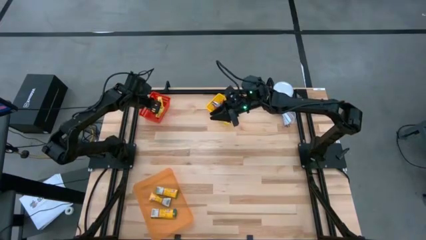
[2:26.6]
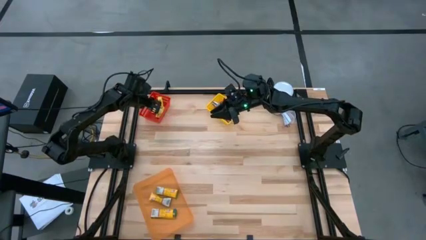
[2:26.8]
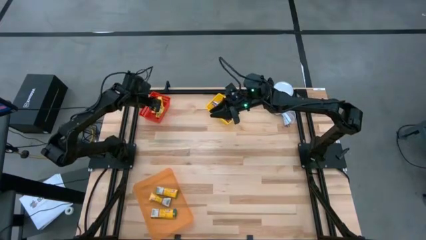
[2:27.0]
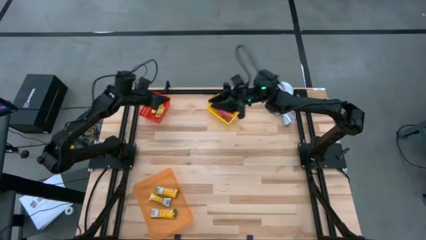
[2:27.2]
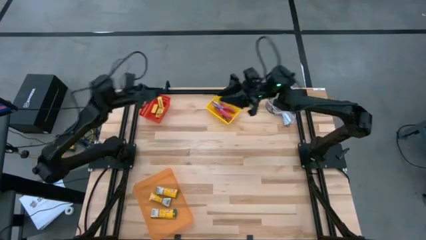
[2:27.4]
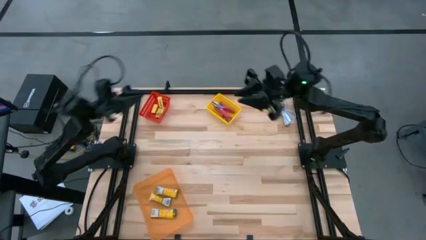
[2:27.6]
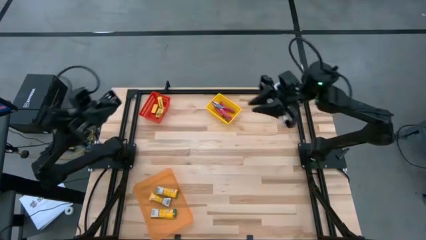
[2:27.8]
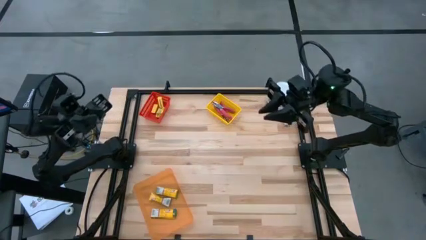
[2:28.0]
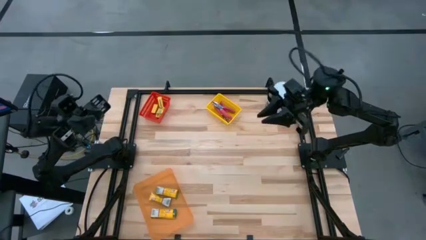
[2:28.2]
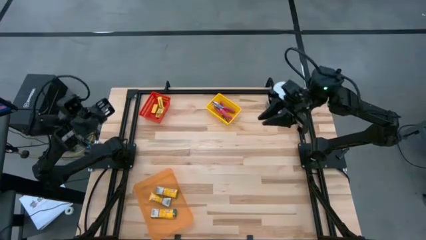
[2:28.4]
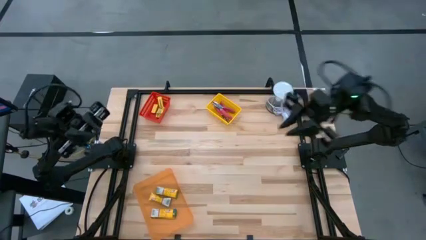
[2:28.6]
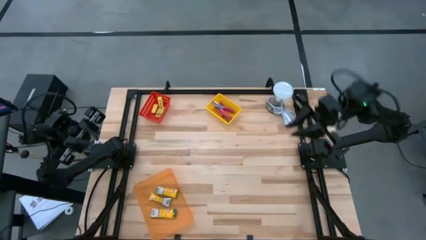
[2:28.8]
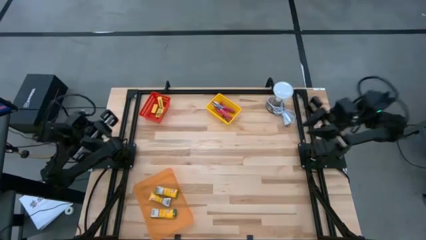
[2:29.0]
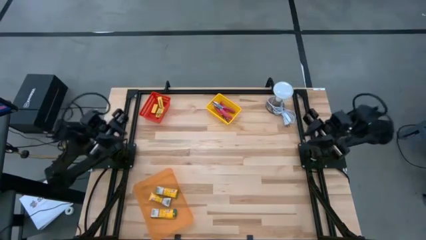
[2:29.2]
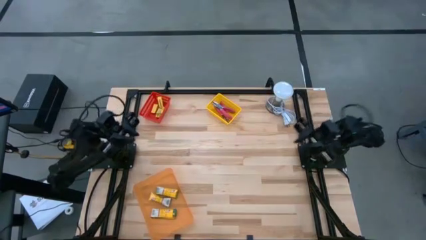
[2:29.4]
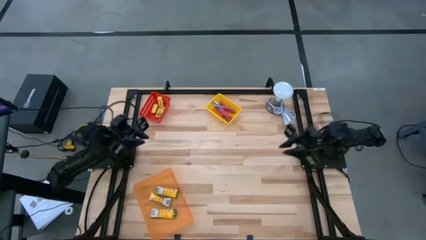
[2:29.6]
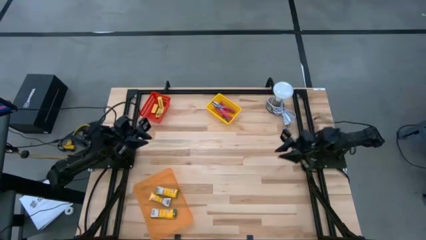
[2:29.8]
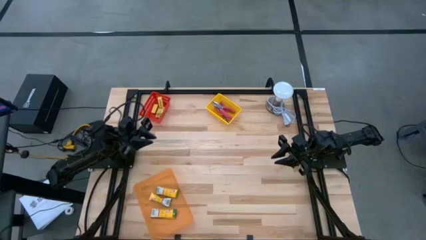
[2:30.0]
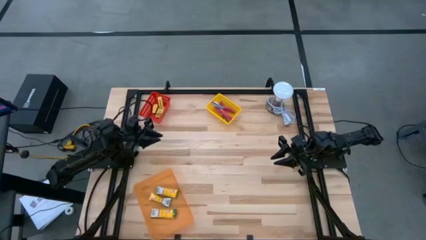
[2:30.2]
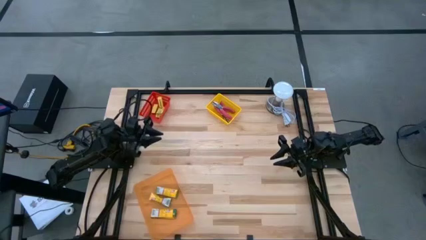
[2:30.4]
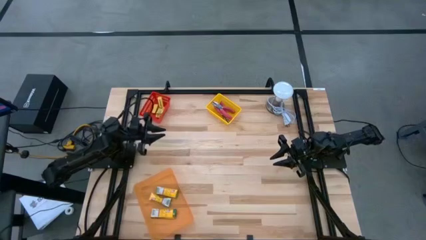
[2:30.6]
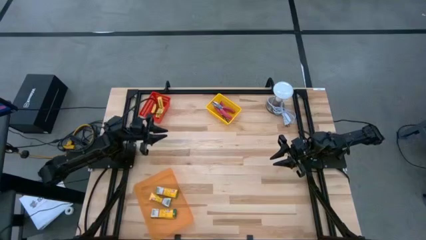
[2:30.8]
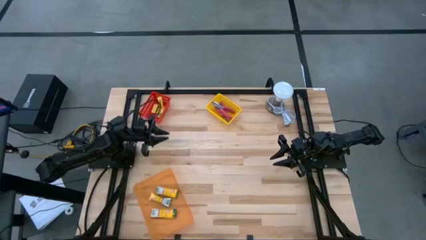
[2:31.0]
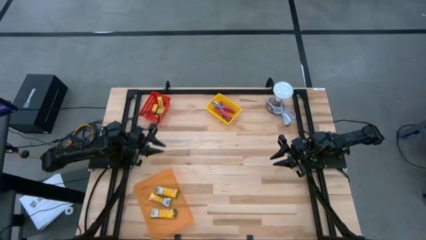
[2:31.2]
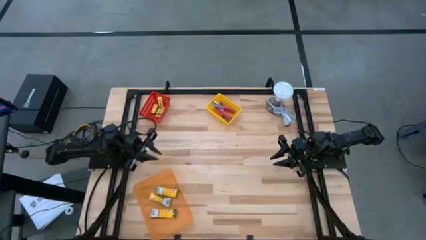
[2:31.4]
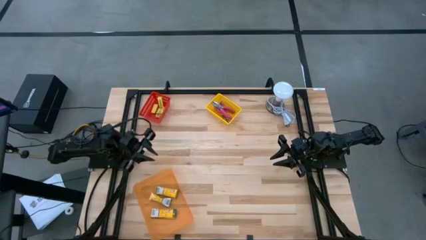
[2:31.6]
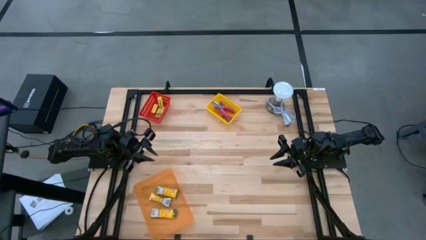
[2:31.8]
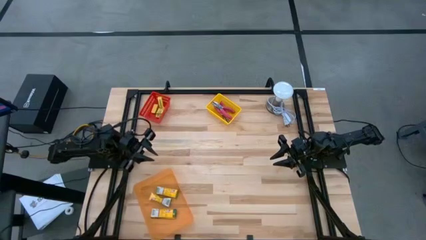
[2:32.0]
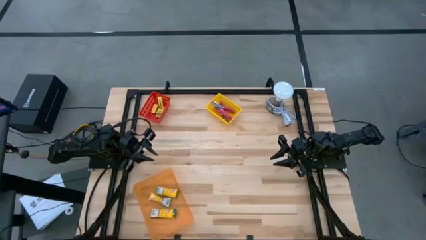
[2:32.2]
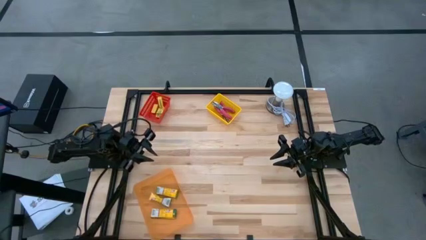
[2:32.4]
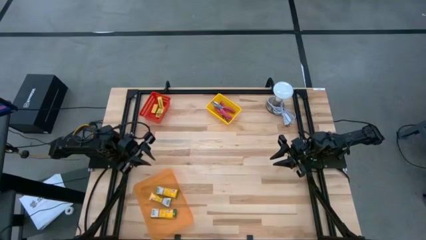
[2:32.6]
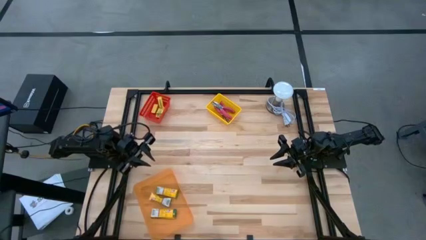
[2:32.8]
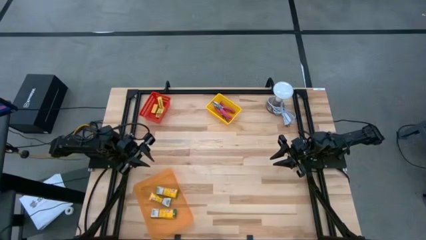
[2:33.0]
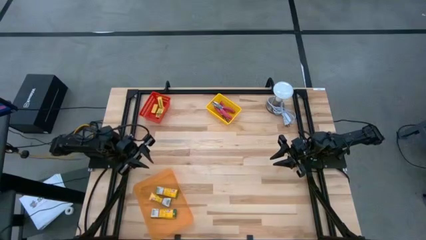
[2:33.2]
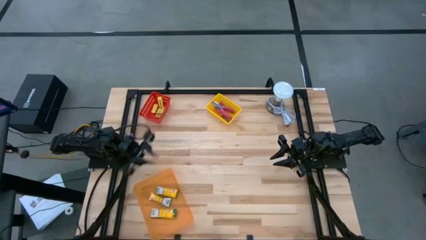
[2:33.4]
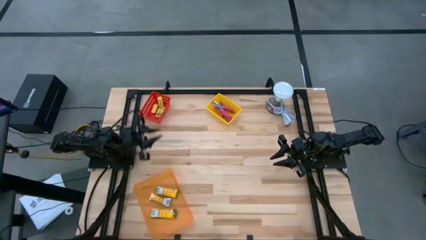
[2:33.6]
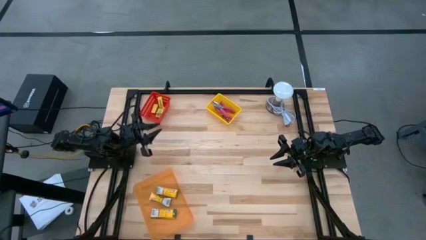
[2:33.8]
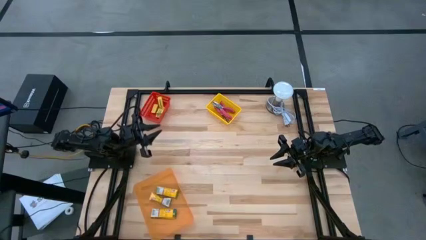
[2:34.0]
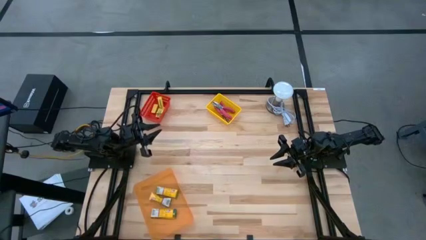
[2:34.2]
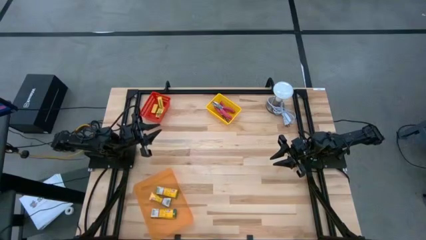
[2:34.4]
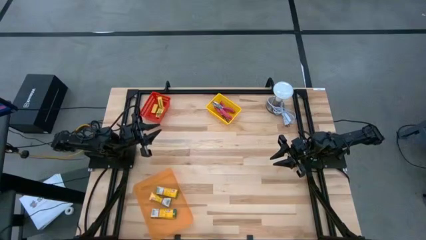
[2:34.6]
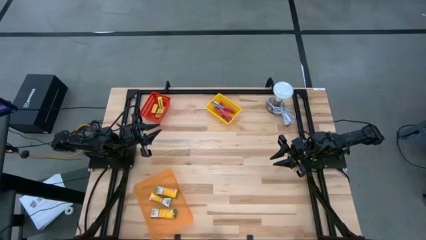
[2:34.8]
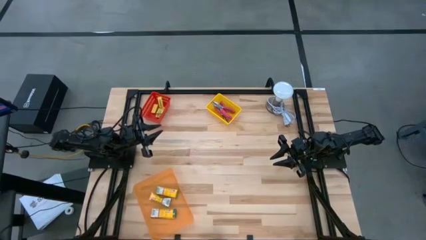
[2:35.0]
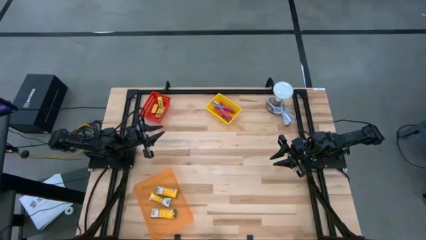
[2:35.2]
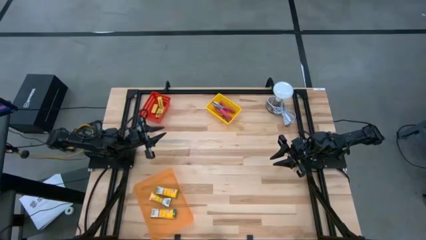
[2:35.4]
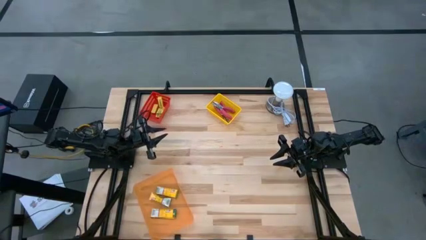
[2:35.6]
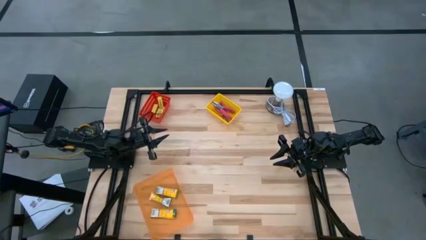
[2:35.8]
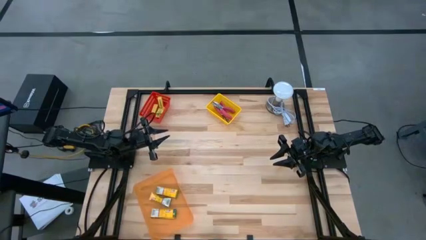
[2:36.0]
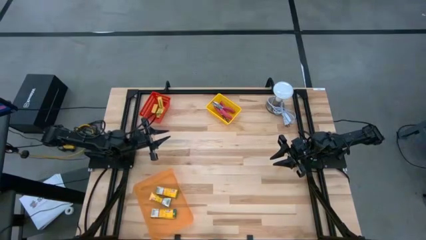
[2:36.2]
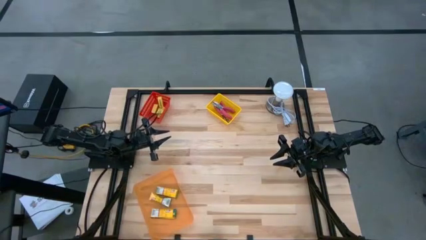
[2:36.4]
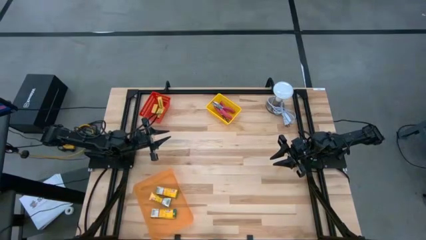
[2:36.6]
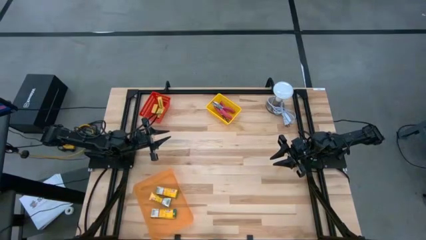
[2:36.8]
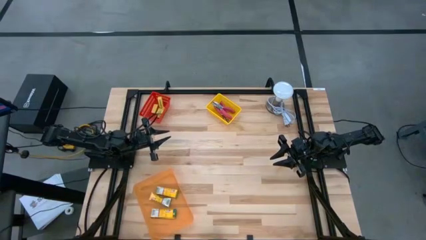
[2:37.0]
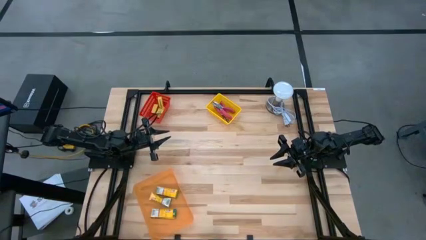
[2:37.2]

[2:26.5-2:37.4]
Task: Pick & Place School Supplies
Return to Home Position

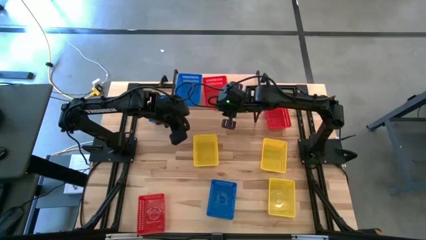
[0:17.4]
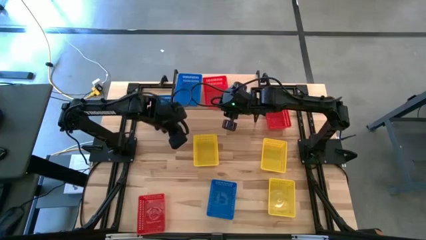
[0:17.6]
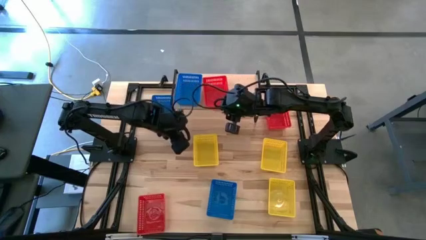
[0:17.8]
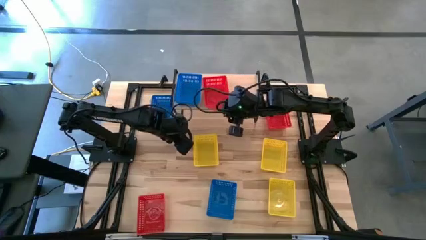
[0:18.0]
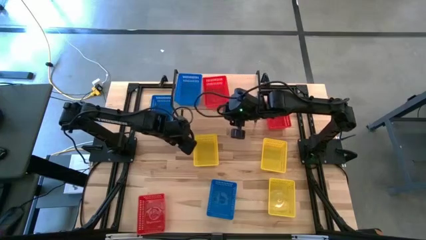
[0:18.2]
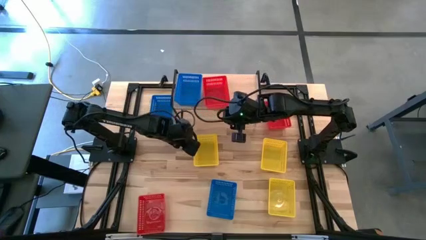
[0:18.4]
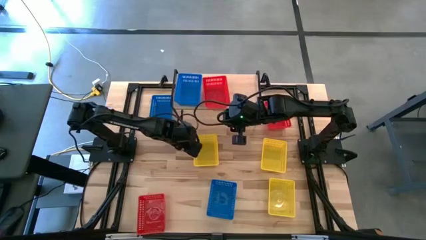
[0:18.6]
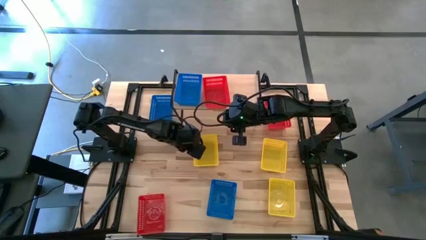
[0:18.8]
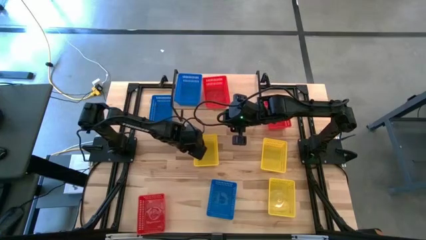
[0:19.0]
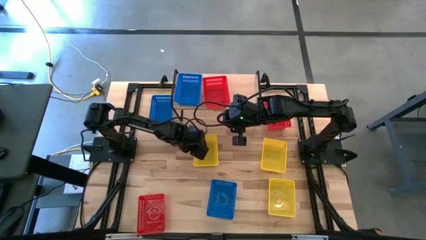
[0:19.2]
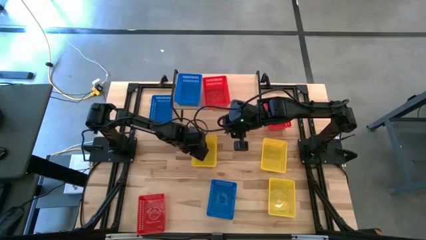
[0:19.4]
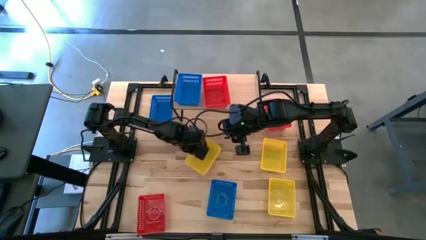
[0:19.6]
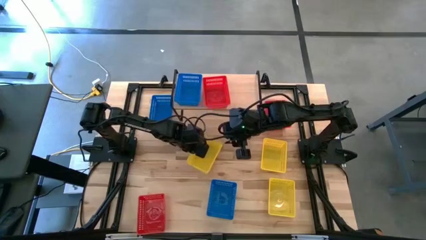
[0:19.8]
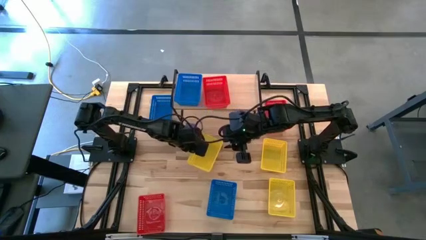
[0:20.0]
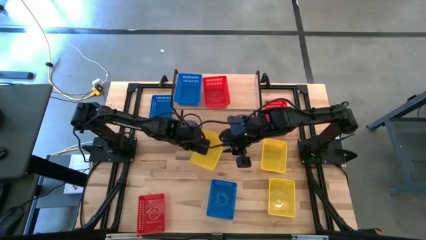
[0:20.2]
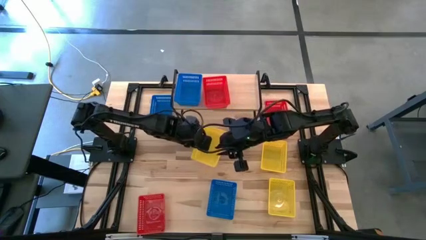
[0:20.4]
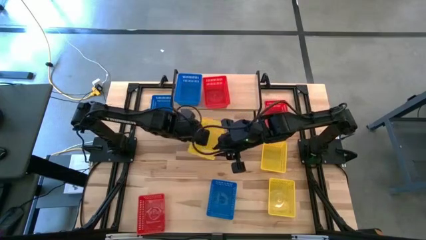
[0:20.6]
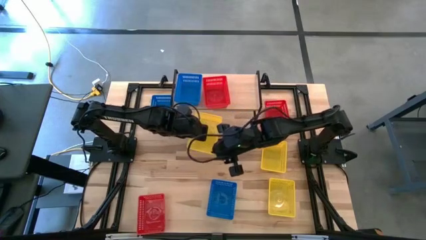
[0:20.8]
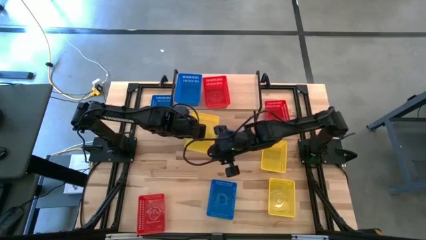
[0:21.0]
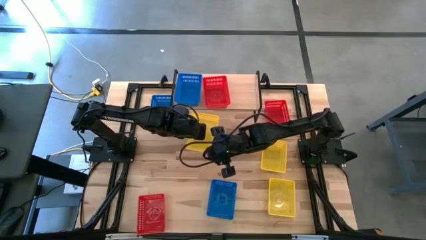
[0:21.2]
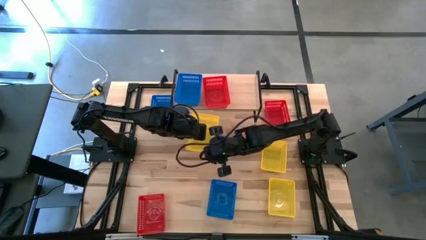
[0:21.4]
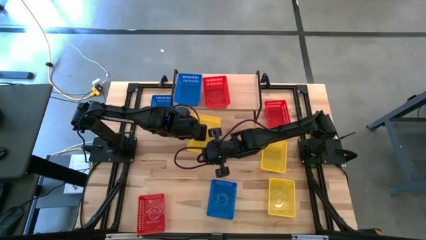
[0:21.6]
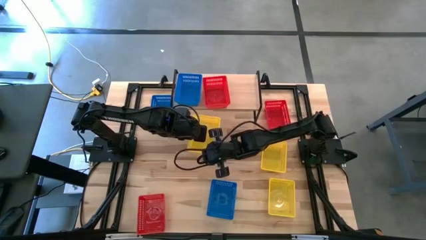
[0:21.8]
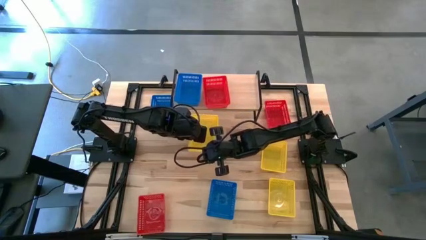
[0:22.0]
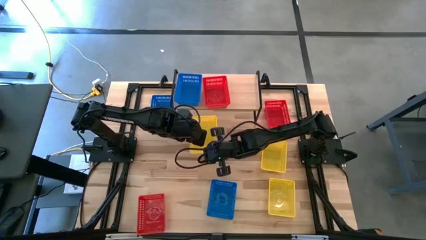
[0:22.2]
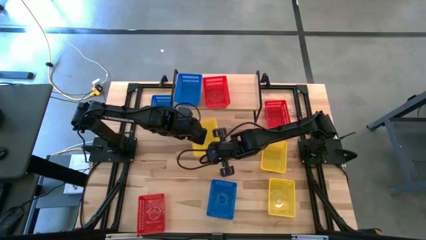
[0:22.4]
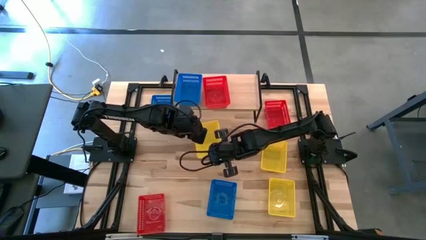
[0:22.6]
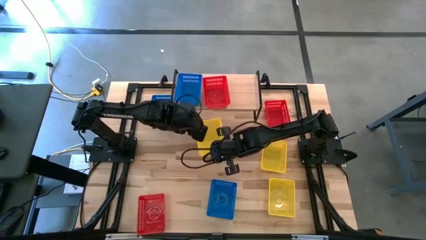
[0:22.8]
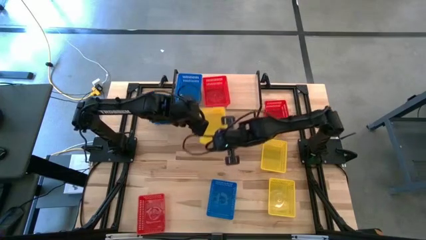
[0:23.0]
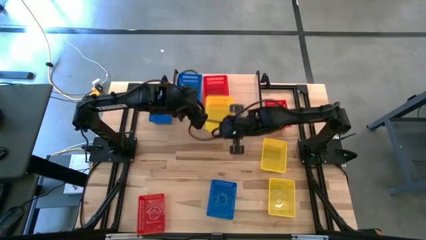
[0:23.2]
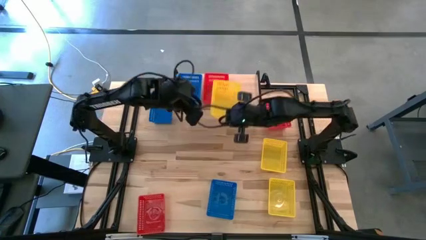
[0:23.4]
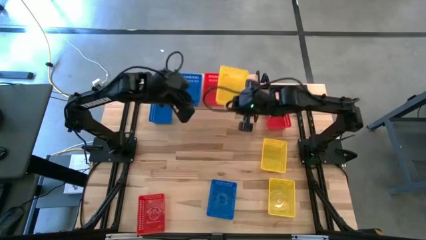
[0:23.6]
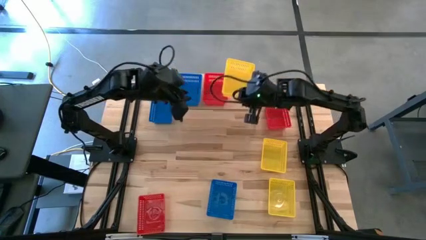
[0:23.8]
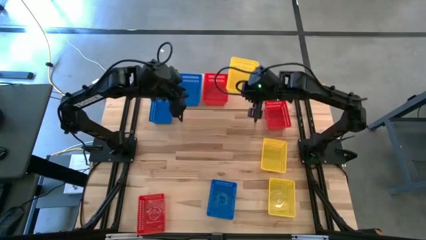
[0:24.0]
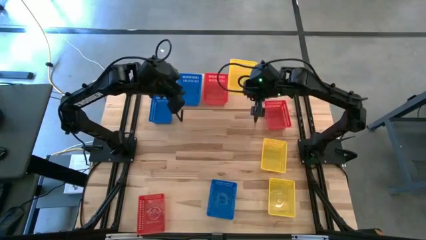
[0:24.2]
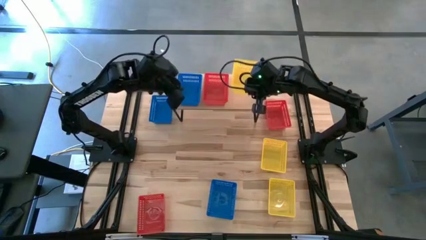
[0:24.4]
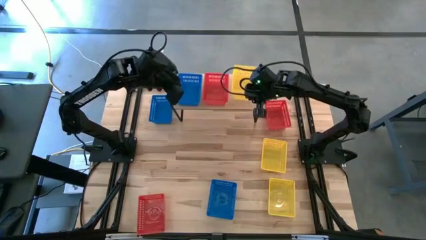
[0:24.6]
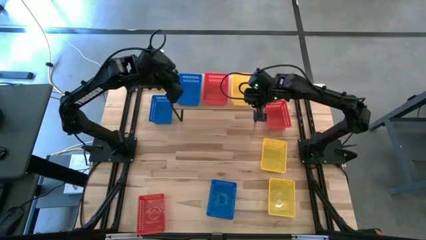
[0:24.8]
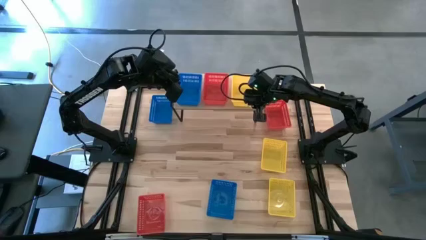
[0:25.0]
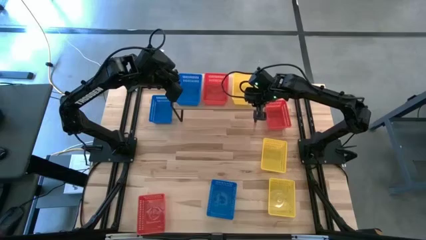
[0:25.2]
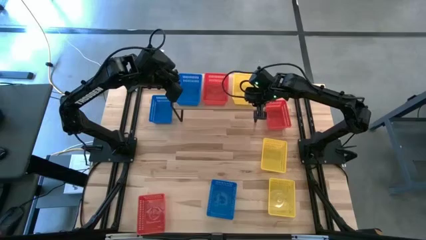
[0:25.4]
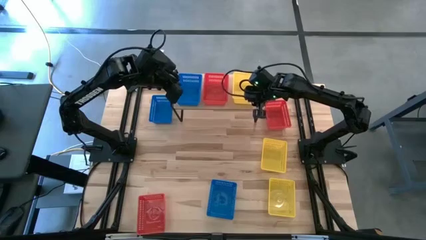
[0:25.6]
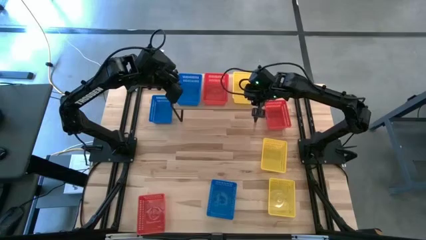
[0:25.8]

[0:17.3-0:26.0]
Task: Stack baskets on shelf by color
Put the top left yellow bin on the shelf
